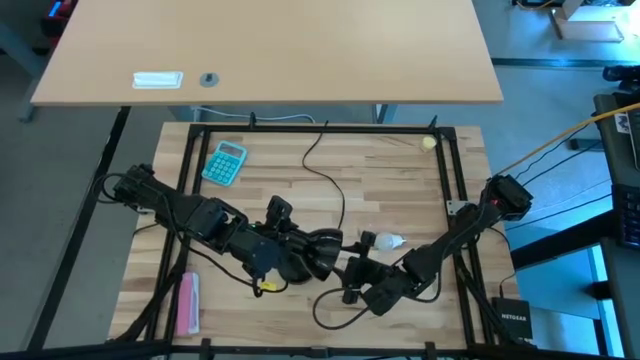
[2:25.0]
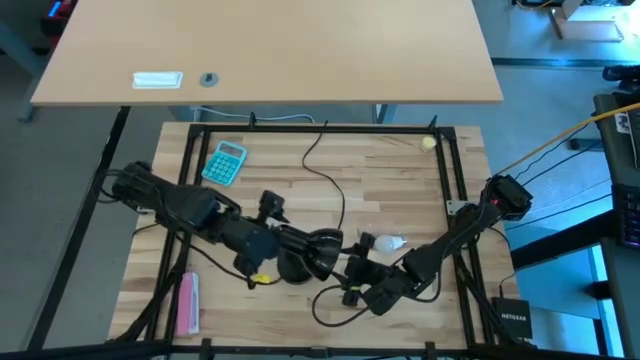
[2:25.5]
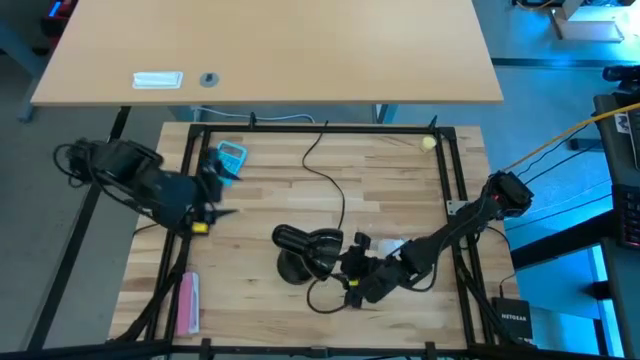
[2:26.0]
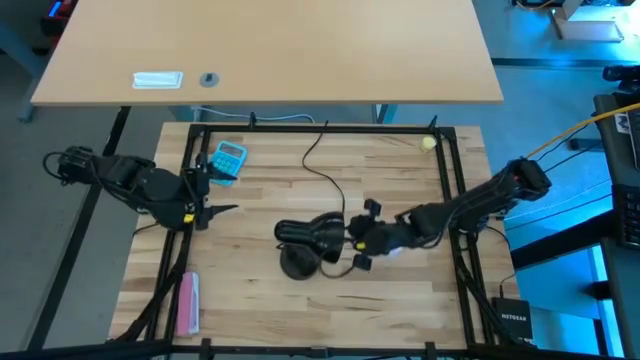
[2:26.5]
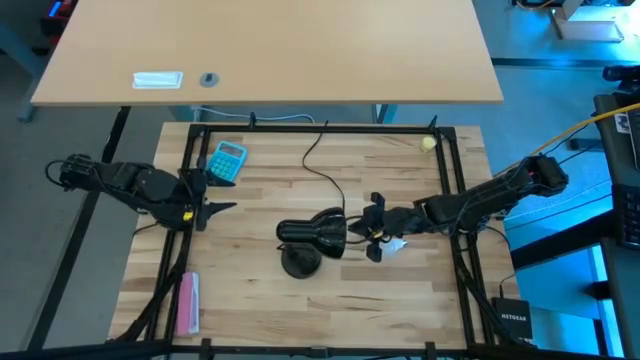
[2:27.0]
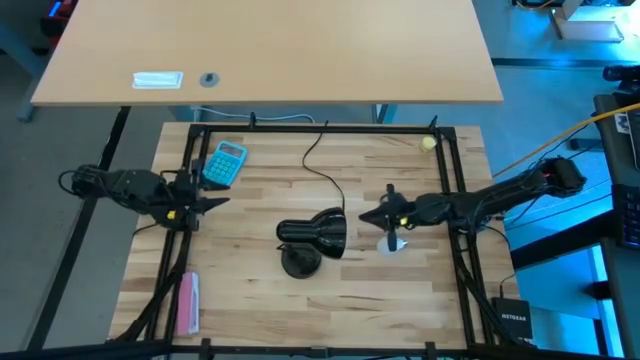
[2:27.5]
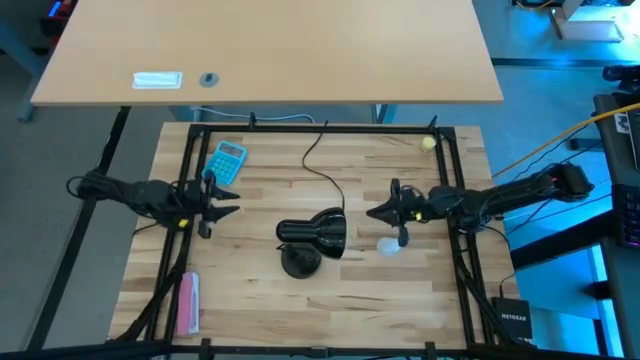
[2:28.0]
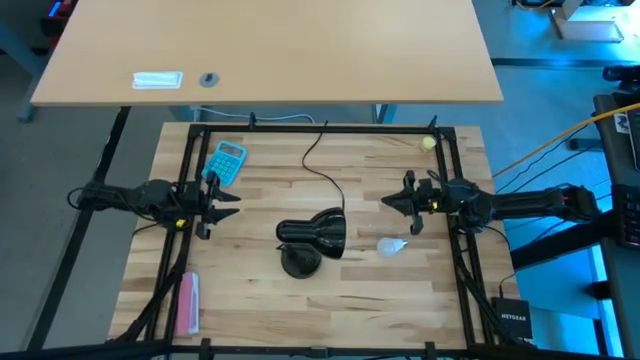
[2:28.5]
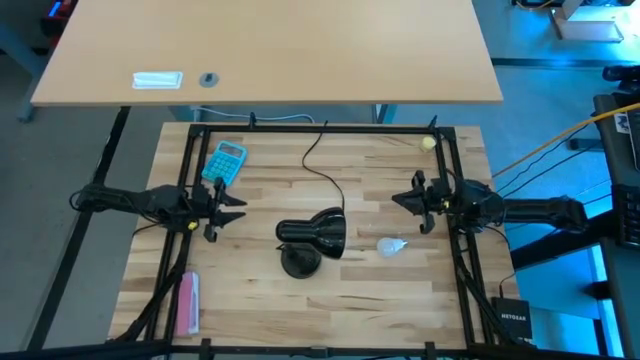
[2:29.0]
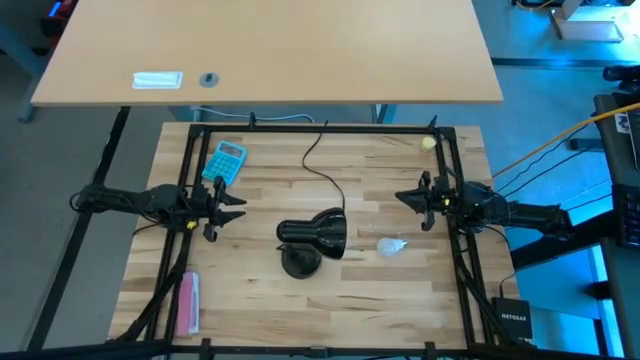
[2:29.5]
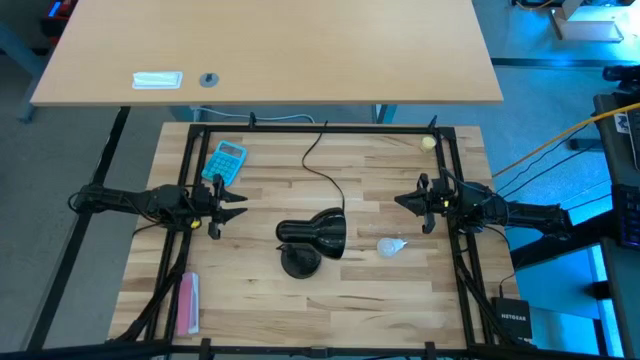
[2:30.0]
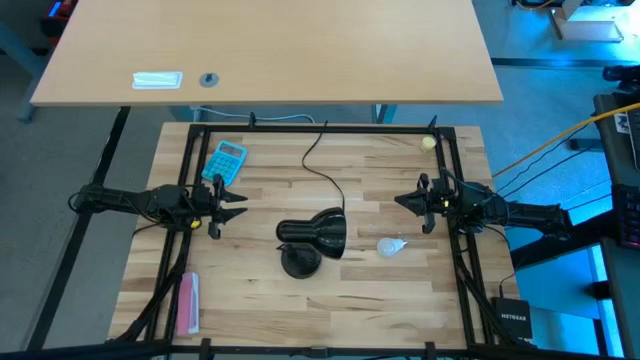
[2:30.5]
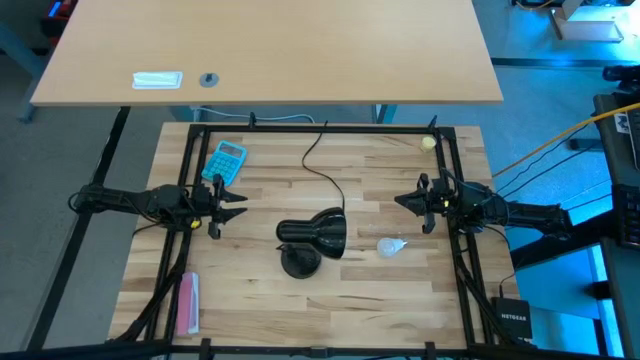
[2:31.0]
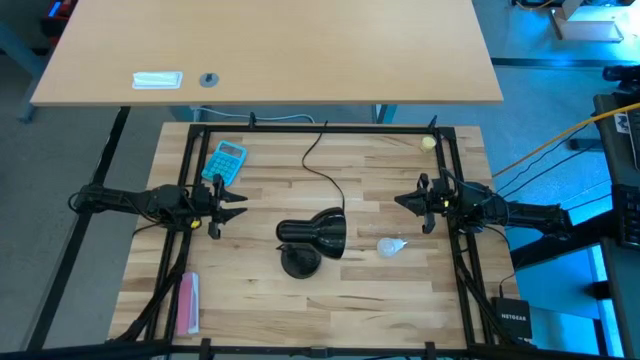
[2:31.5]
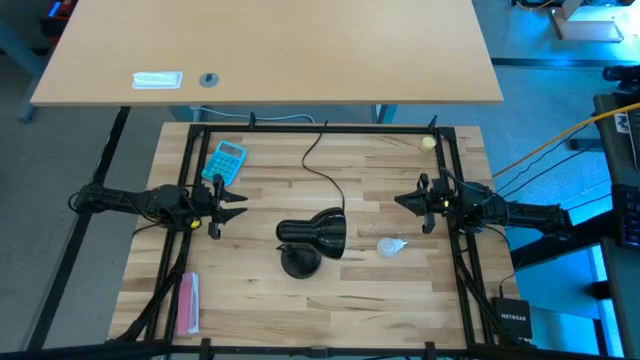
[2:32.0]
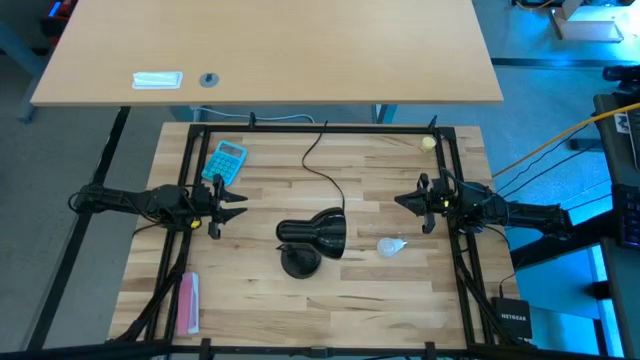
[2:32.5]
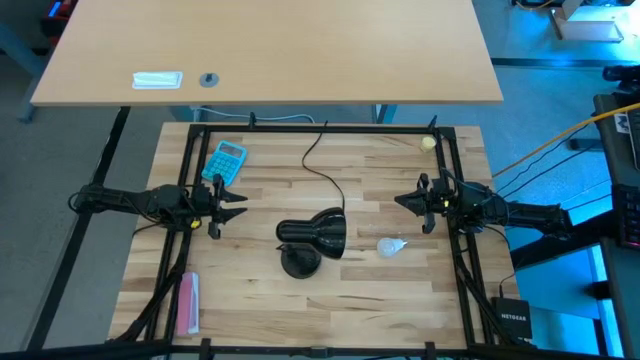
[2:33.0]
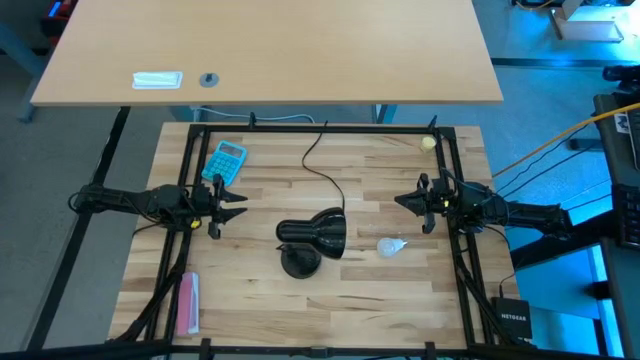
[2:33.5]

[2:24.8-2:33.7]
Task: Screw lightbulb
Return to Home Position

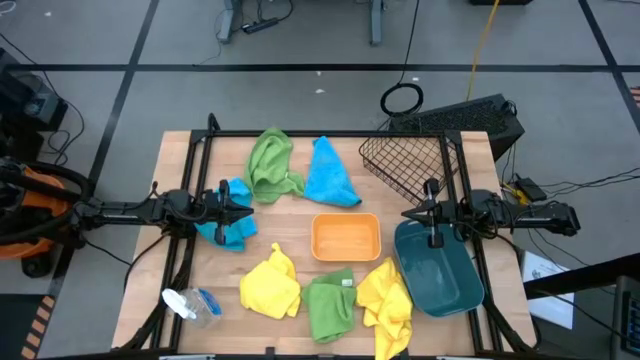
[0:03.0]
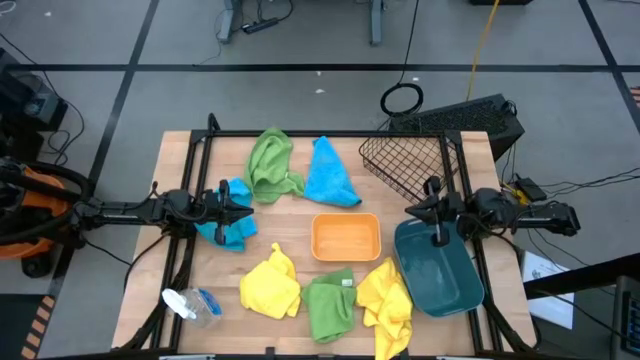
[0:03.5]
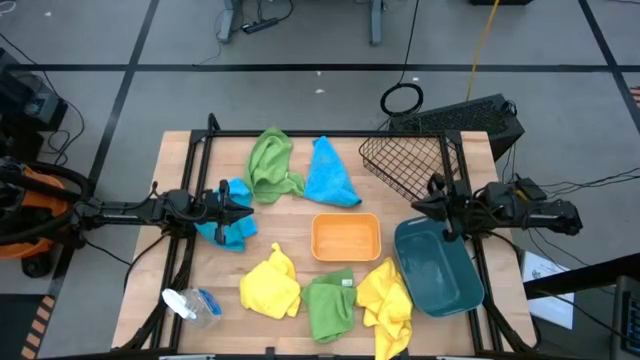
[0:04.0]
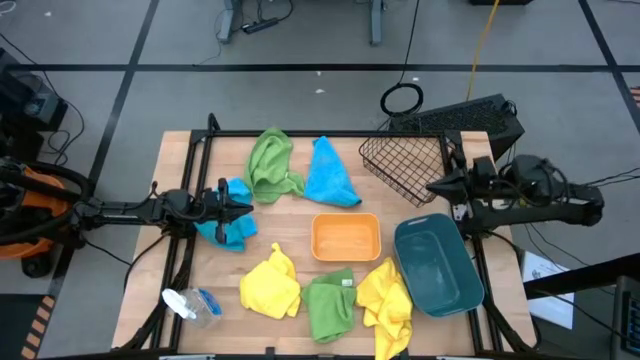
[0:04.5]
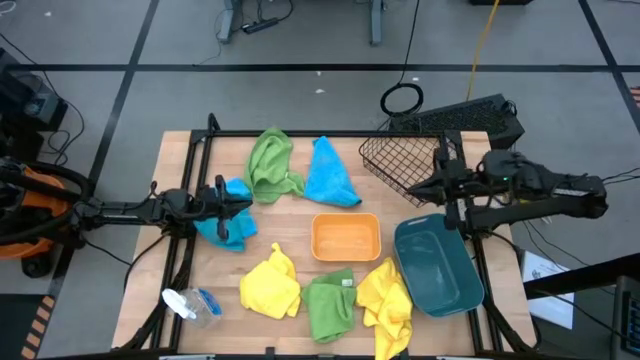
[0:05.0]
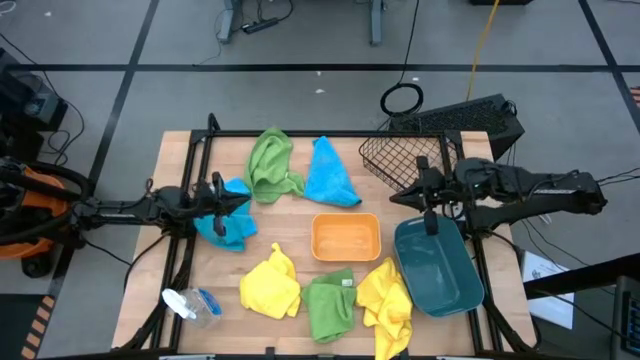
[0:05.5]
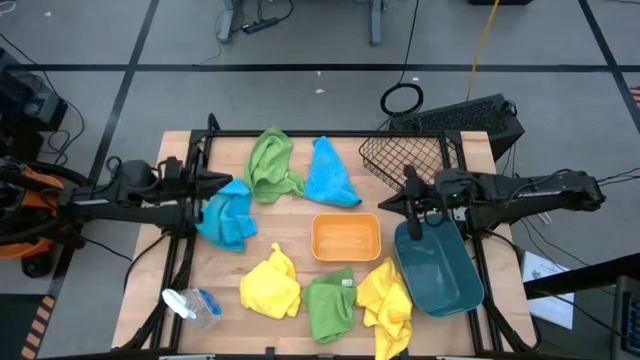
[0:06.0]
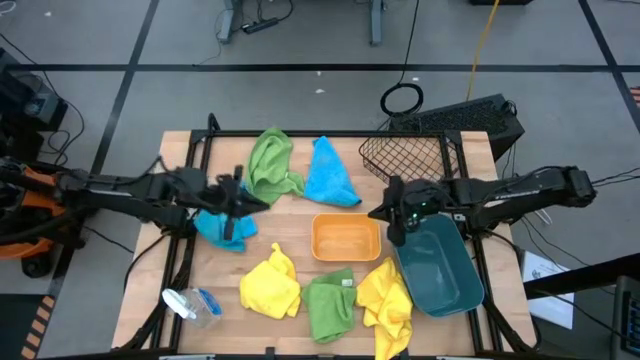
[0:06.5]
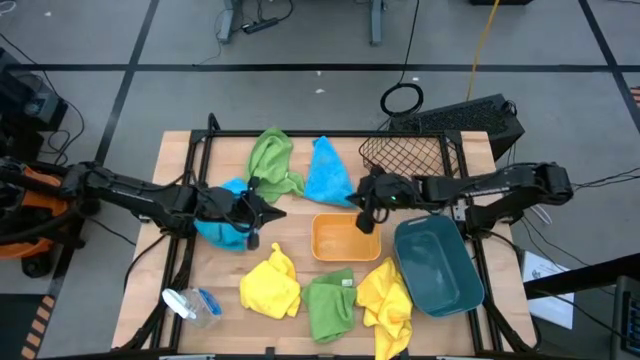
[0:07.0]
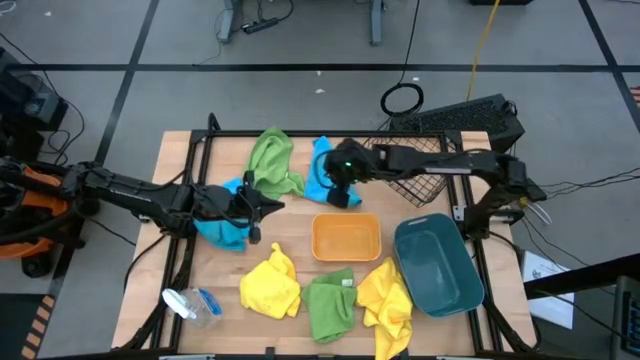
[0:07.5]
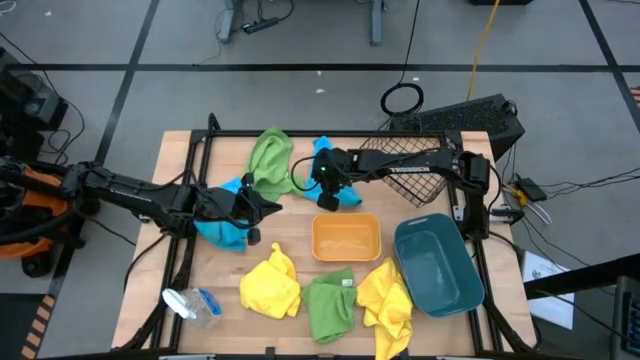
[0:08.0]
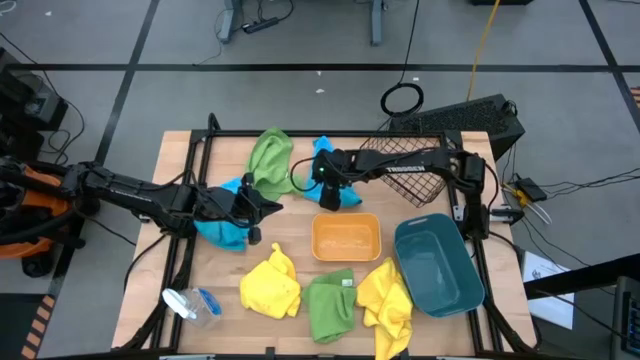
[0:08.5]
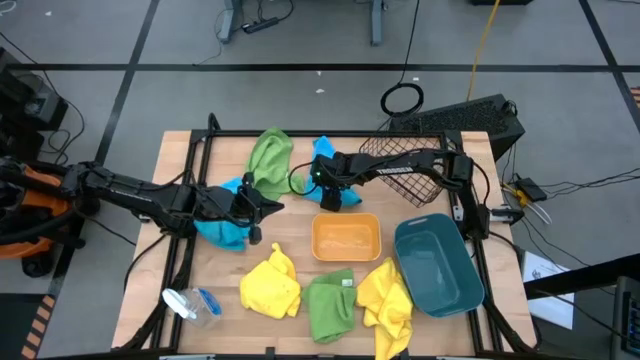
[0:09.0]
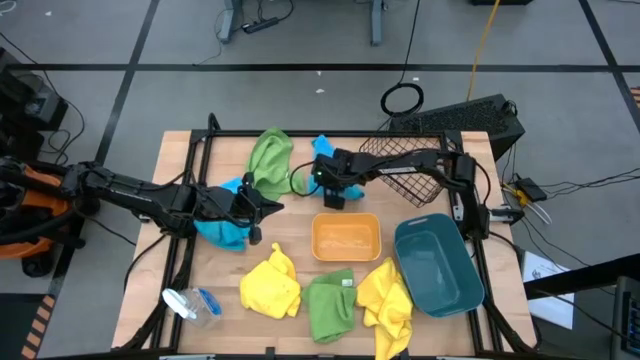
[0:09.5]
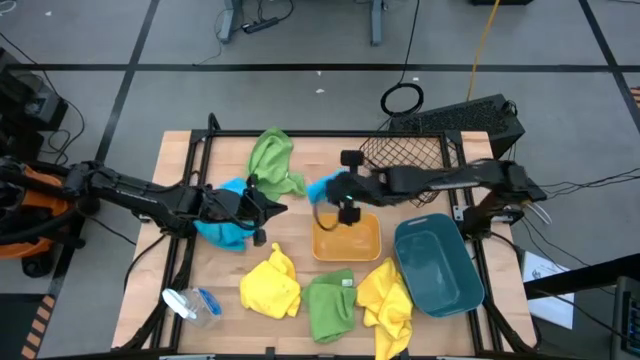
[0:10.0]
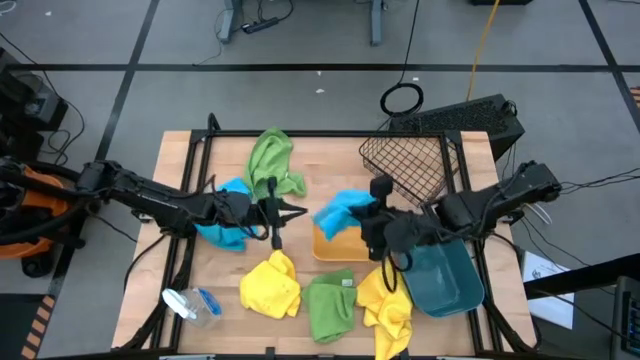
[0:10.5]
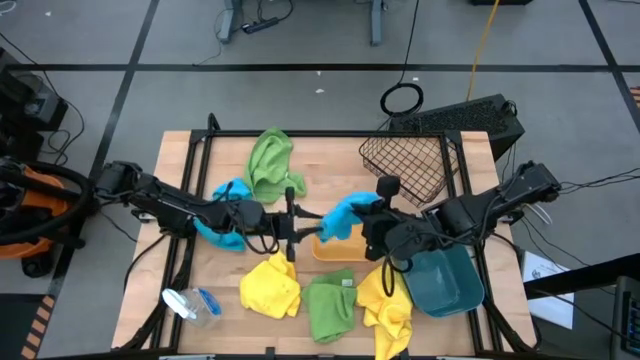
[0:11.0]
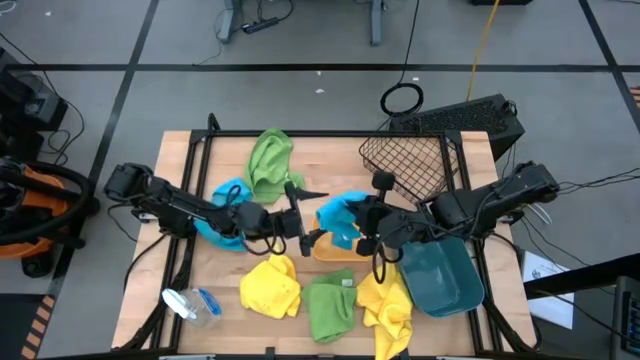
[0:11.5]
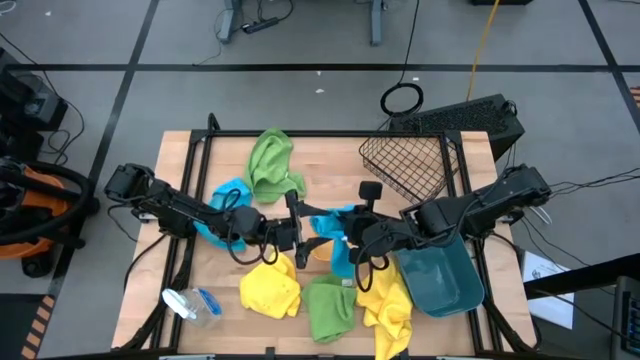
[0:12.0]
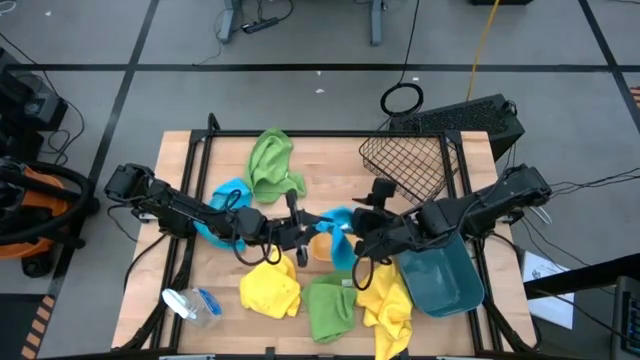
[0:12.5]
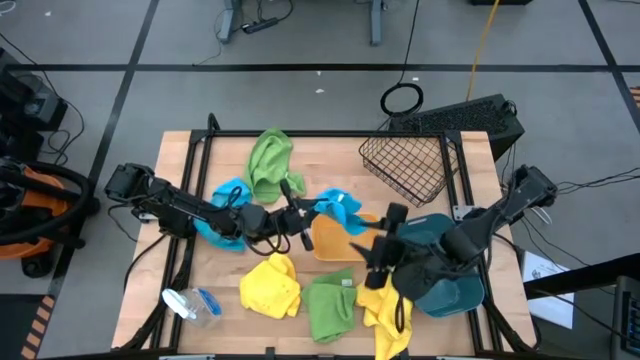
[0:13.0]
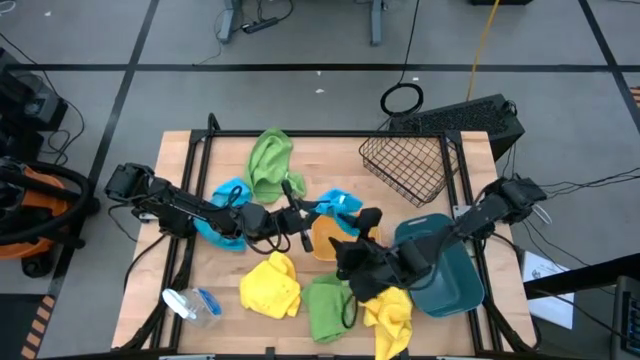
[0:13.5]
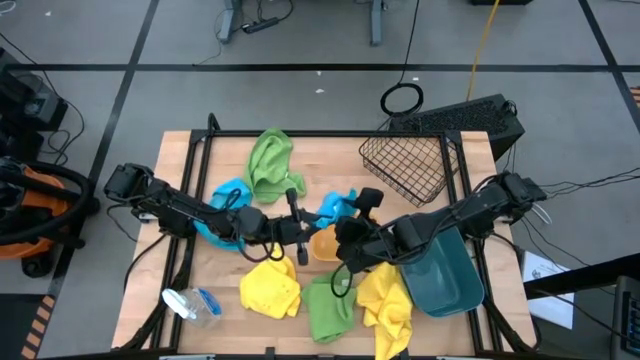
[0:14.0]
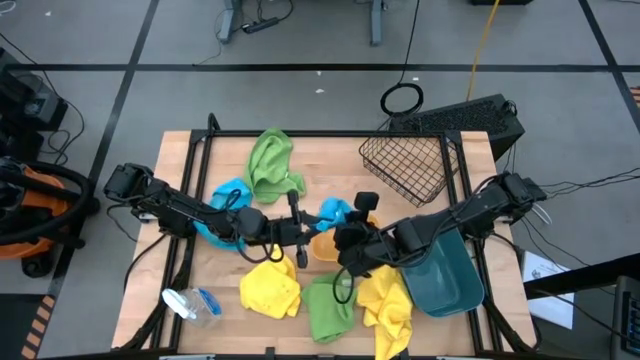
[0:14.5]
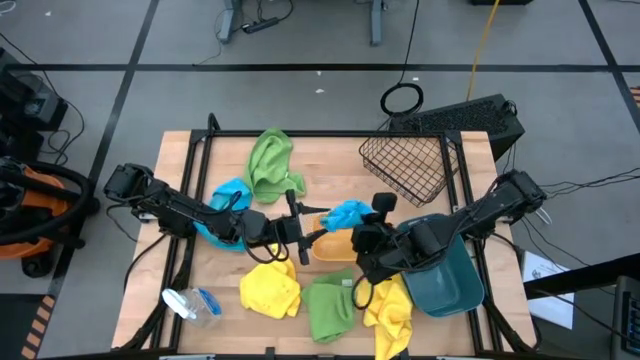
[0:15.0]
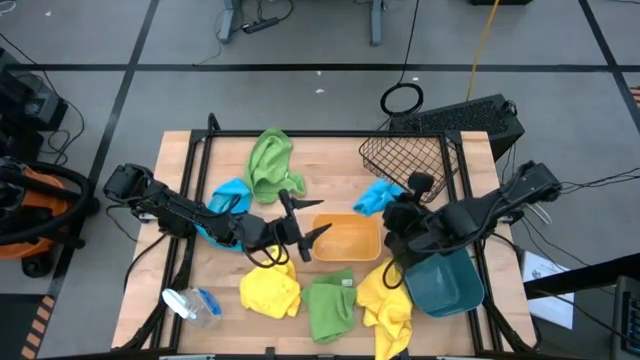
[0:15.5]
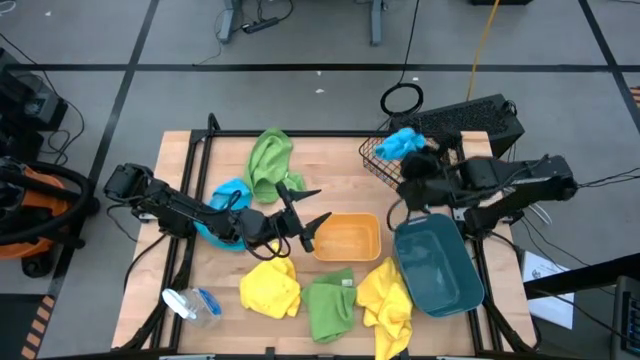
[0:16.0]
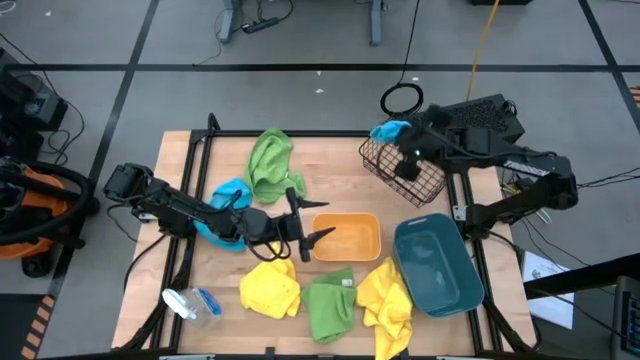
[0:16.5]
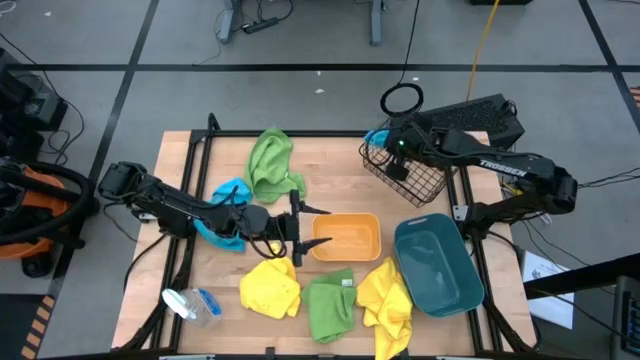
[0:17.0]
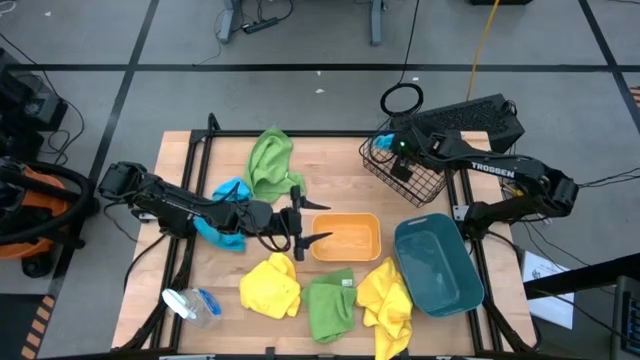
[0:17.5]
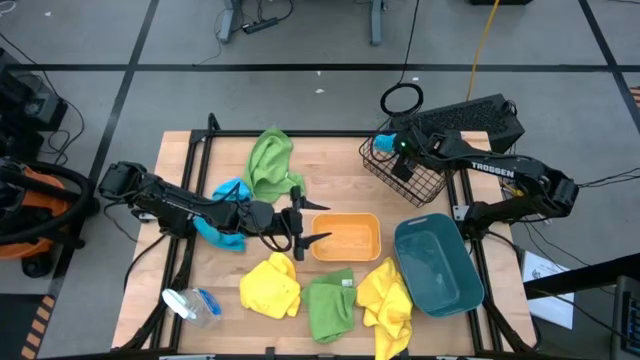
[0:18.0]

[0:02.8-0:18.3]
Task: Sort microfiber towel by color & place in baskets
Put the right blue microfiber cloth into the wire basket
